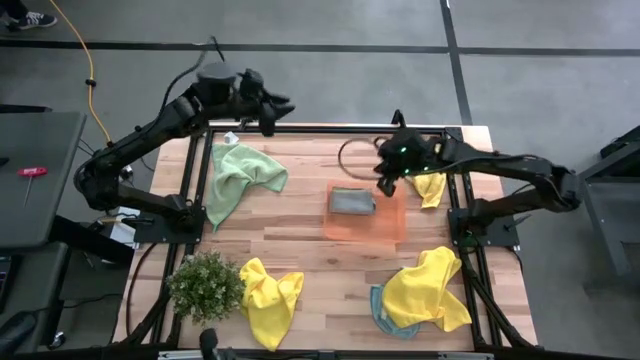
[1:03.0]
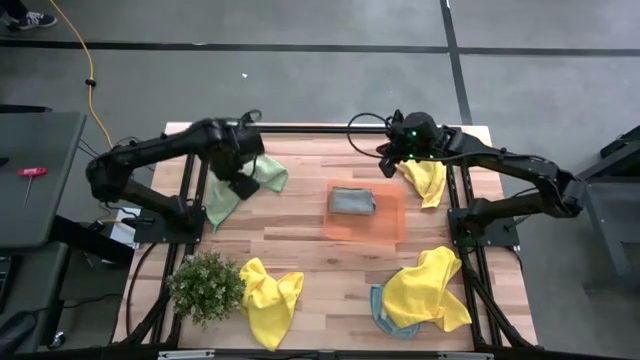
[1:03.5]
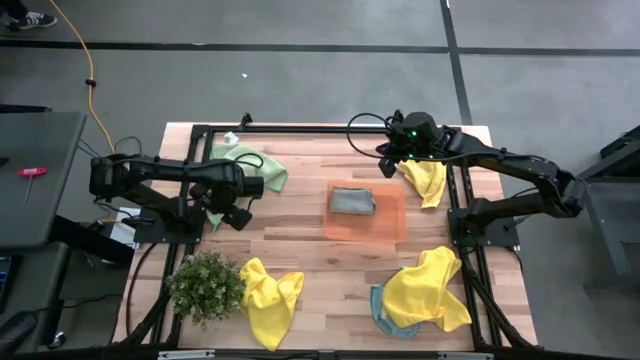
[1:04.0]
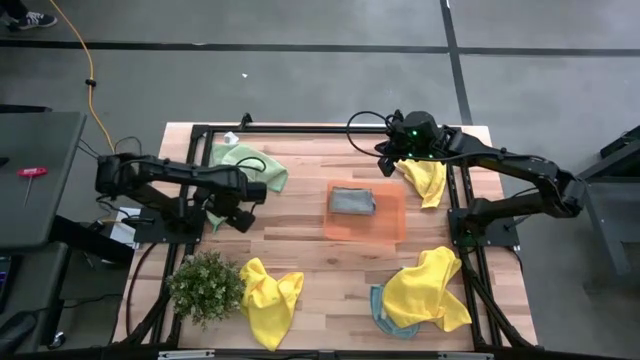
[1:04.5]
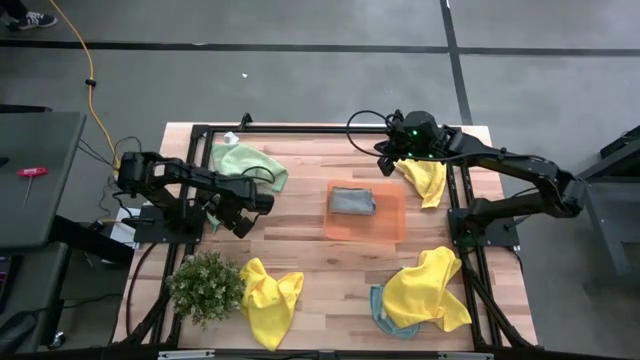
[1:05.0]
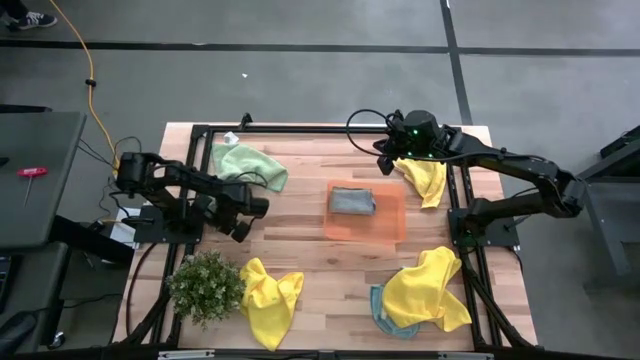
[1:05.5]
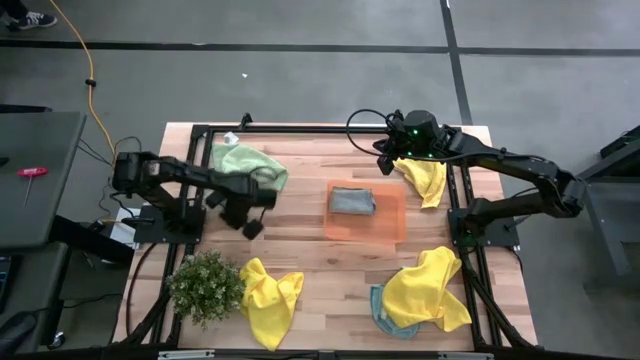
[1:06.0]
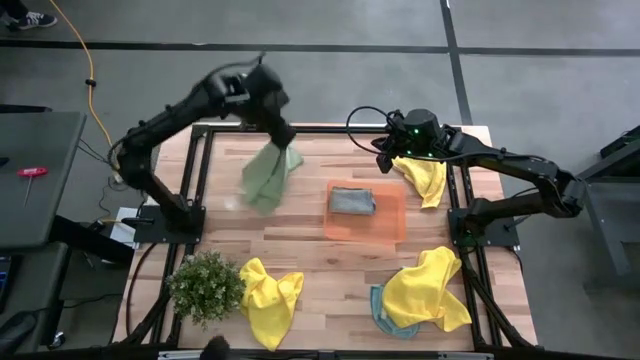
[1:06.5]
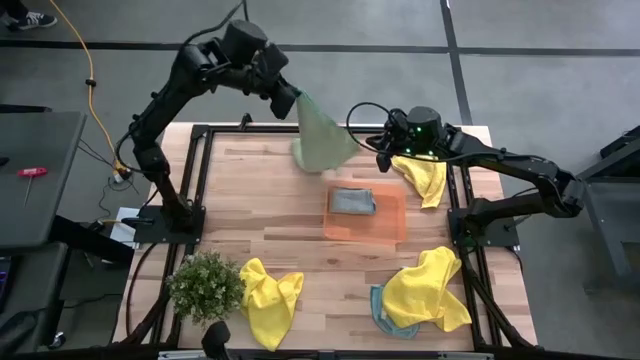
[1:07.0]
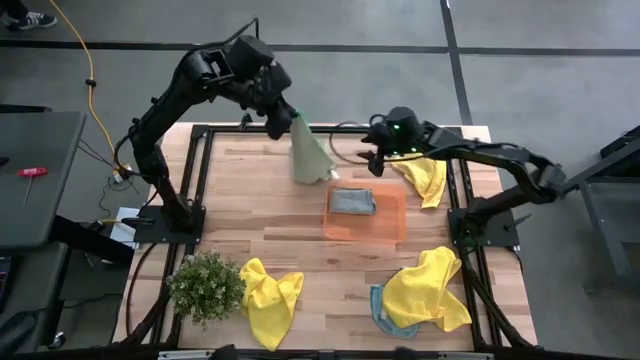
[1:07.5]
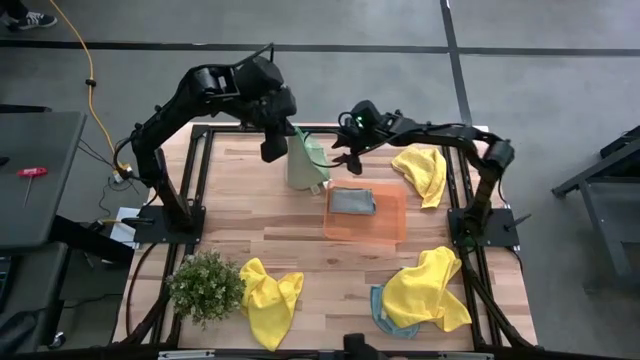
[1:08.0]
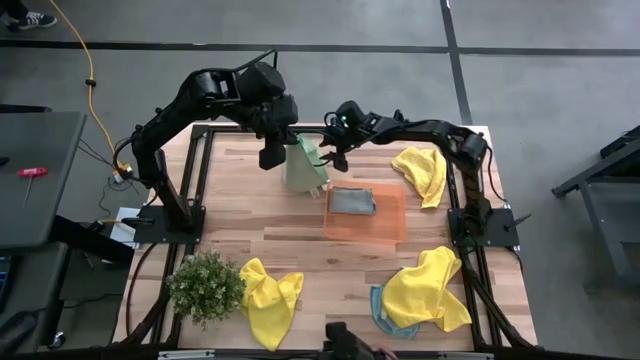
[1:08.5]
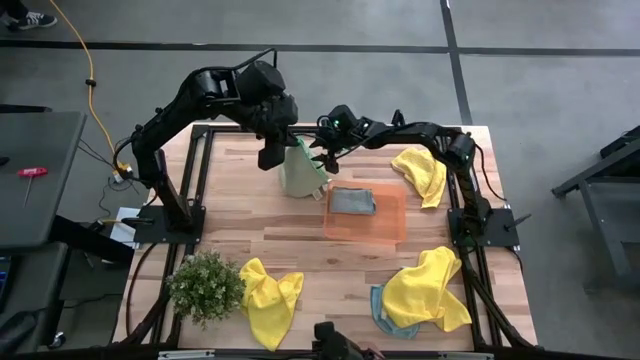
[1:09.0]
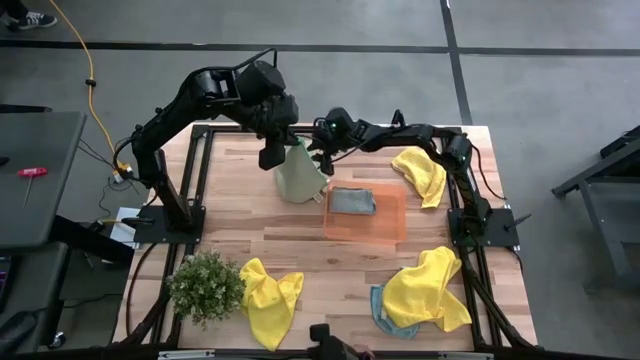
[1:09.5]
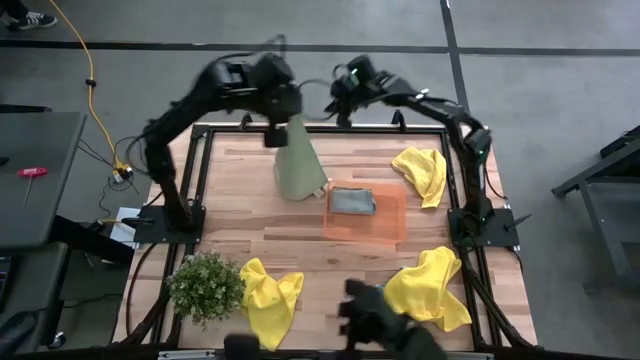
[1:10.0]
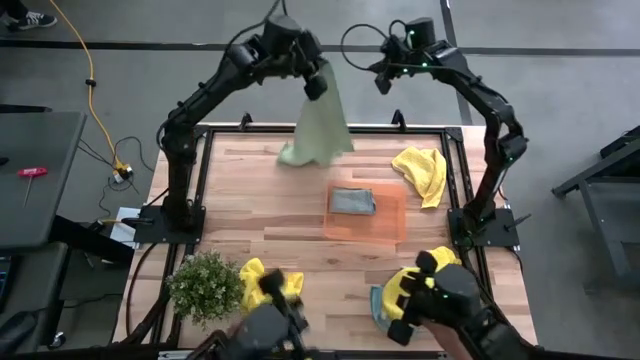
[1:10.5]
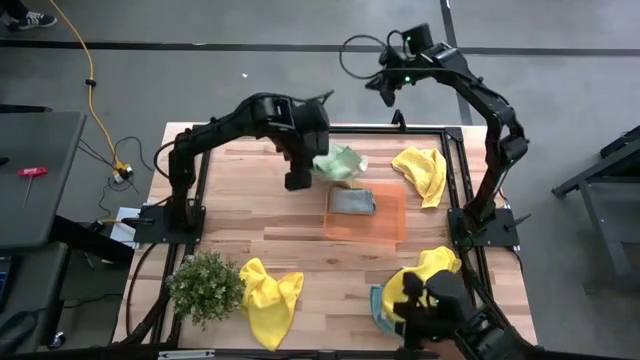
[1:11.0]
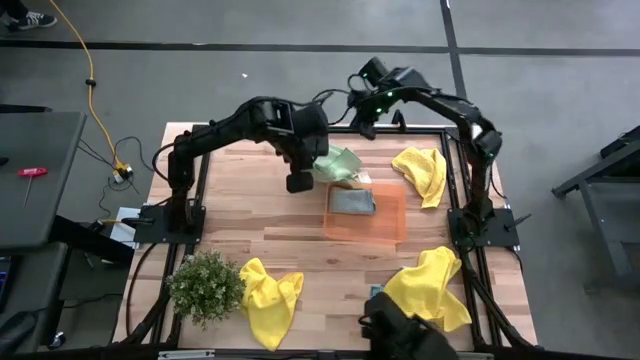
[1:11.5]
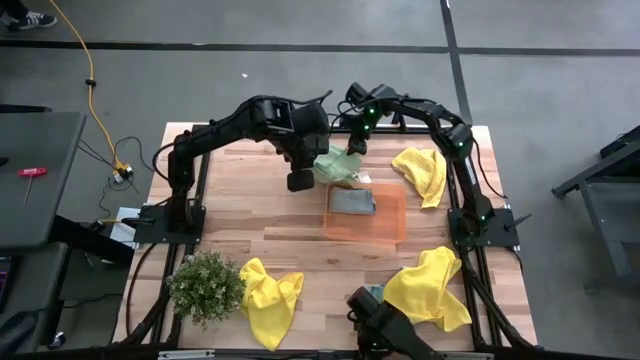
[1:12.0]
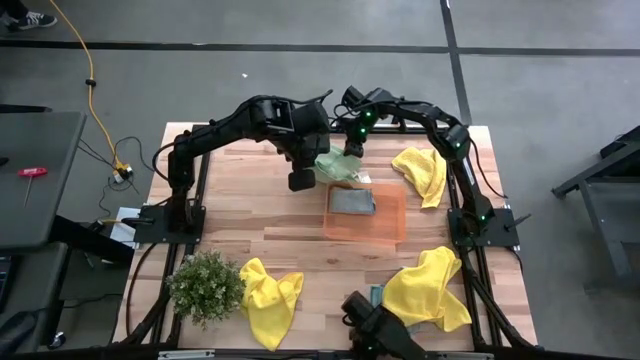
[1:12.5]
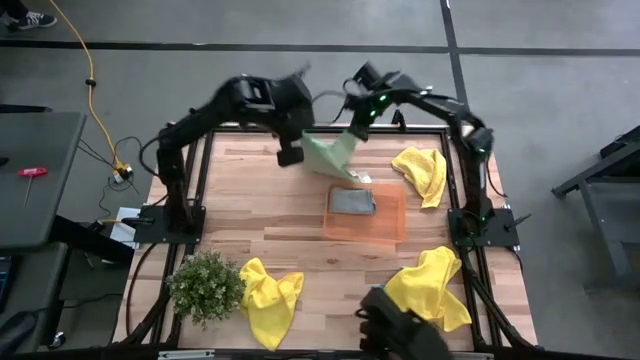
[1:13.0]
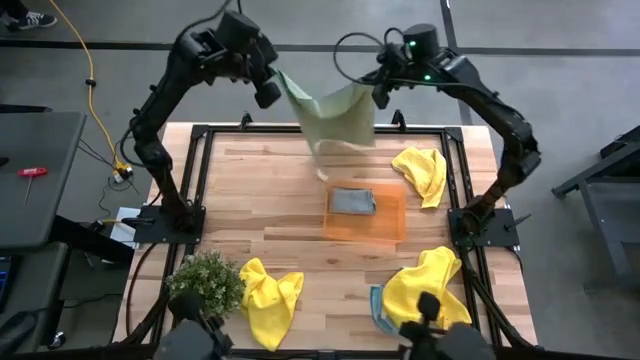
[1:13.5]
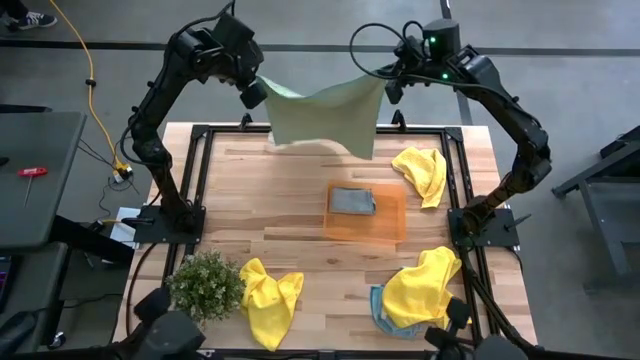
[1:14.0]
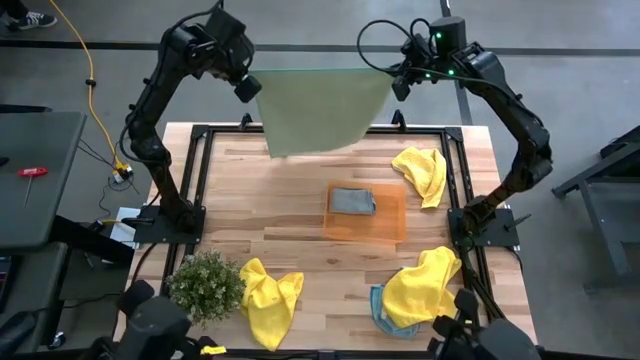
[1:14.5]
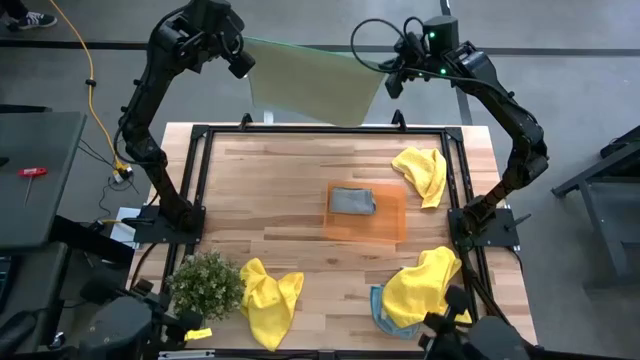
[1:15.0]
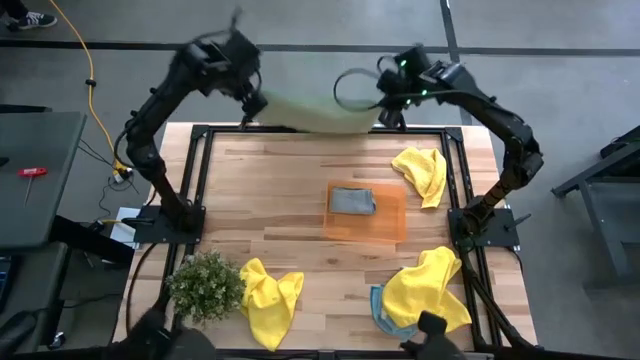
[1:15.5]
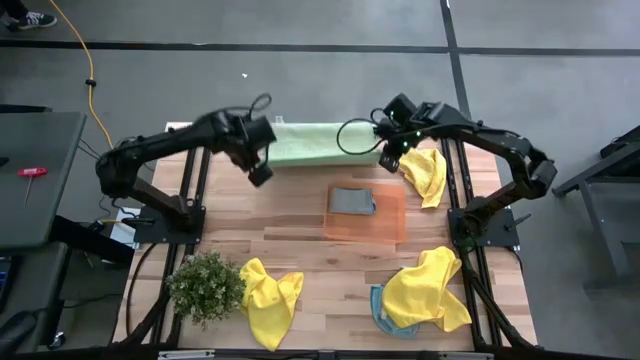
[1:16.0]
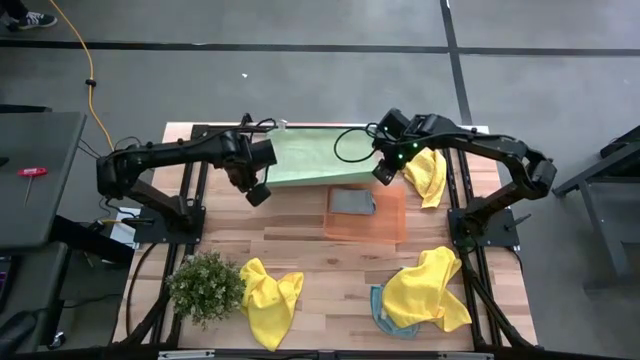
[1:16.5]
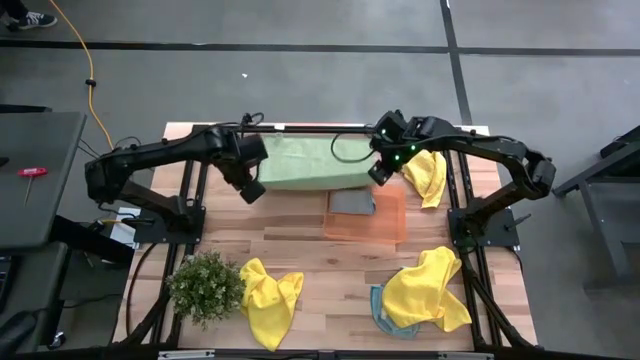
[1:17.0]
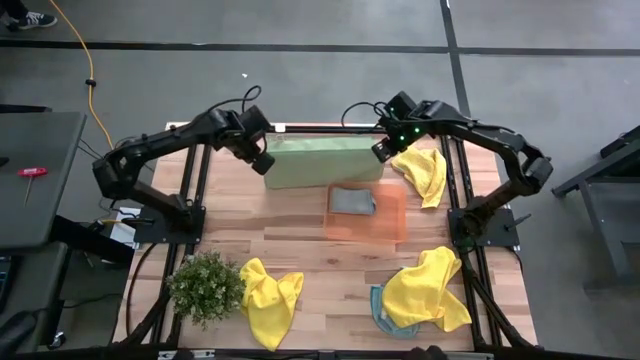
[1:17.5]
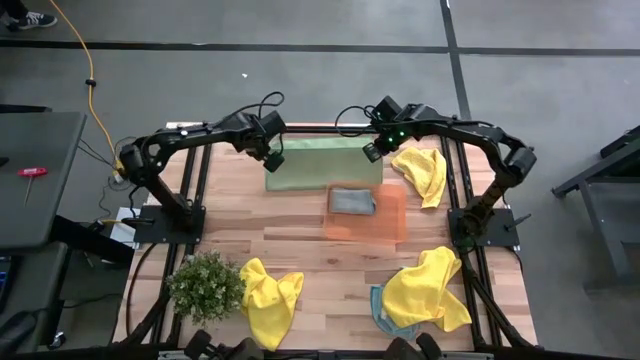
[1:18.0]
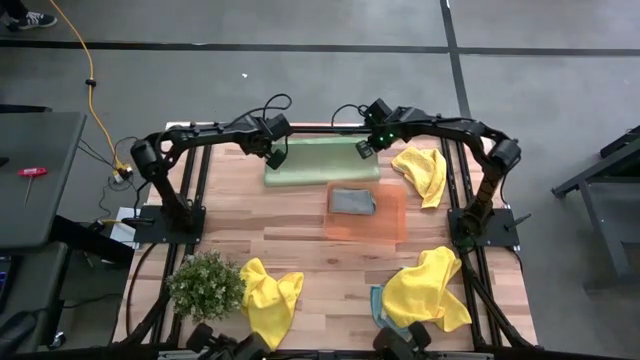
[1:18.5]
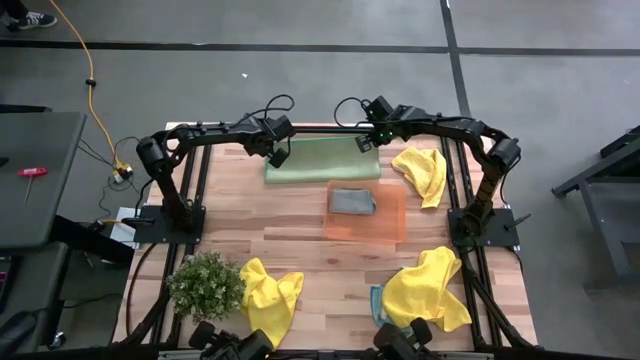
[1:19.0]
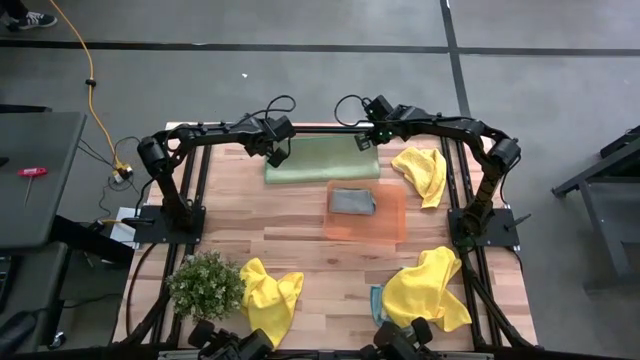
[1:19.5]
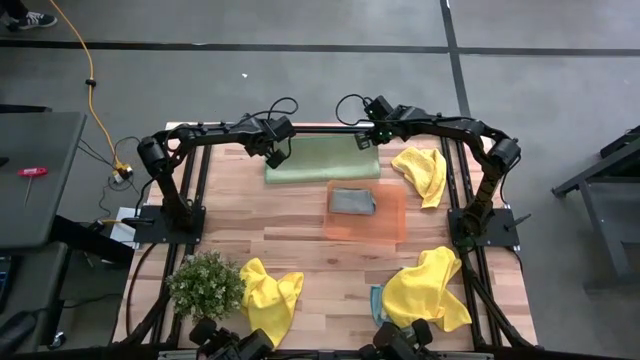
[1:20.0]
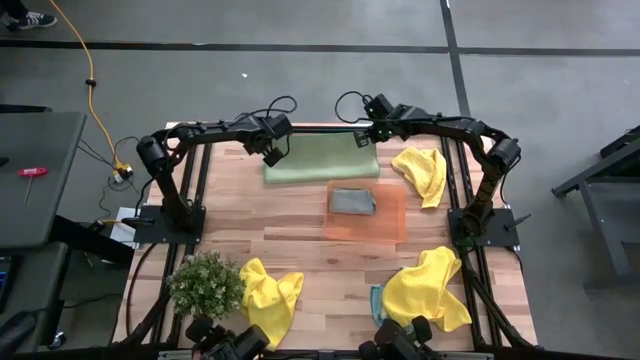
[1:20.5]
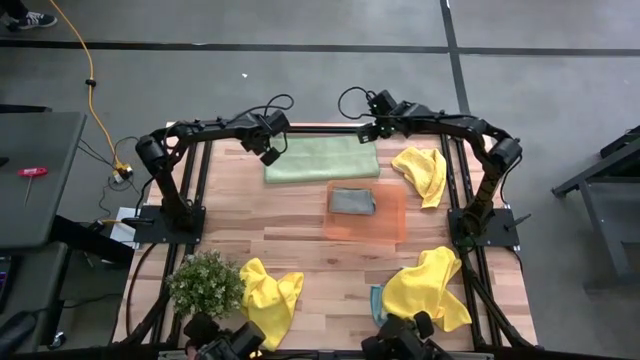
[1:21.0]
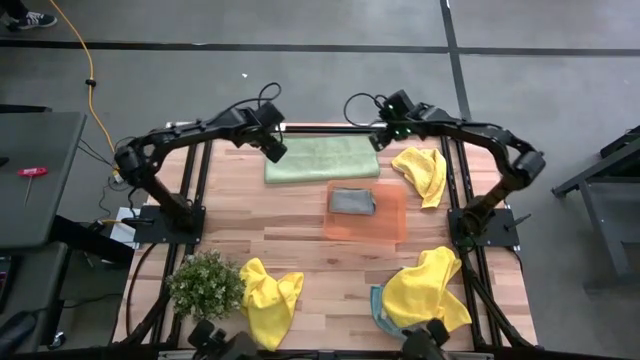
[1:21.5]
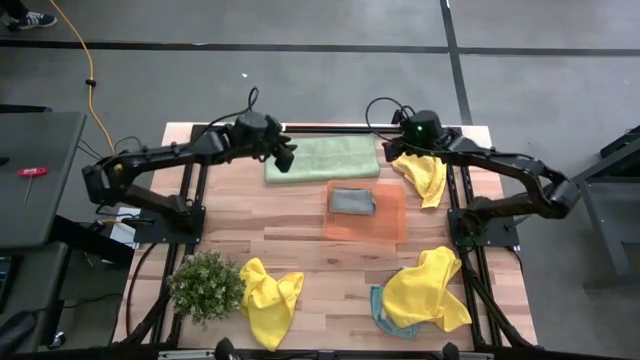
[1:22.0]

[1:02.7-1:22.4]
Task: Fold microfiber towels
Fold the green microfiber towel
